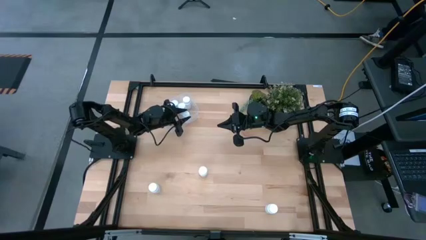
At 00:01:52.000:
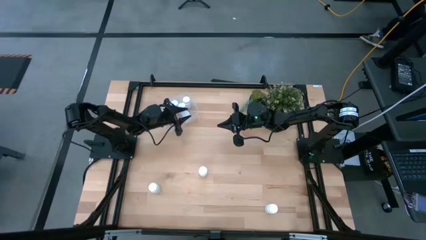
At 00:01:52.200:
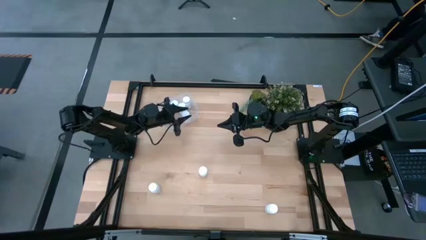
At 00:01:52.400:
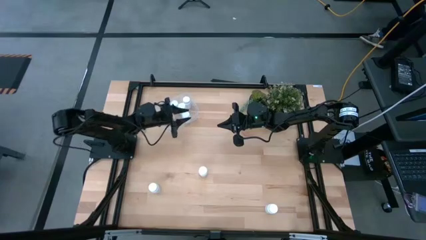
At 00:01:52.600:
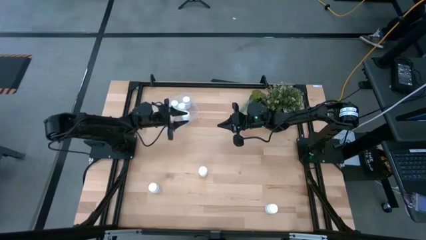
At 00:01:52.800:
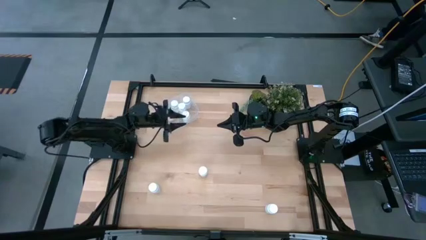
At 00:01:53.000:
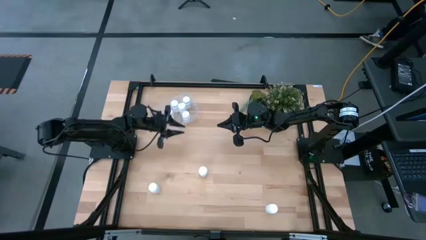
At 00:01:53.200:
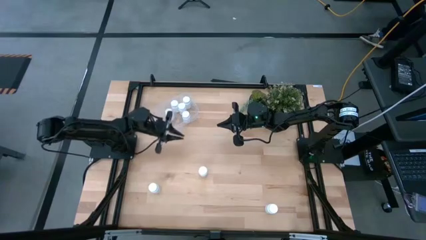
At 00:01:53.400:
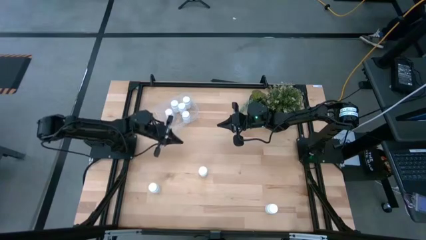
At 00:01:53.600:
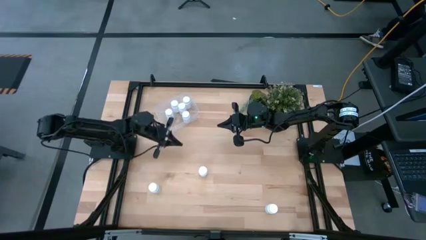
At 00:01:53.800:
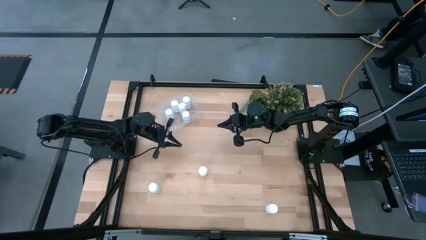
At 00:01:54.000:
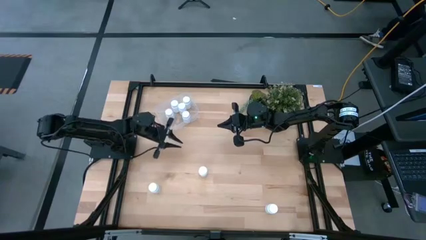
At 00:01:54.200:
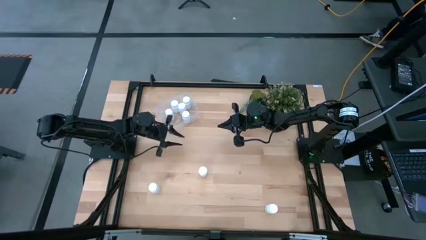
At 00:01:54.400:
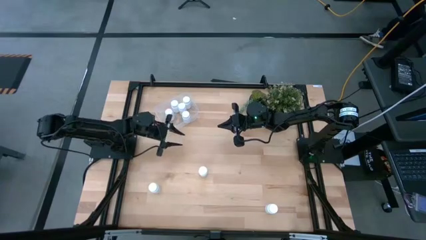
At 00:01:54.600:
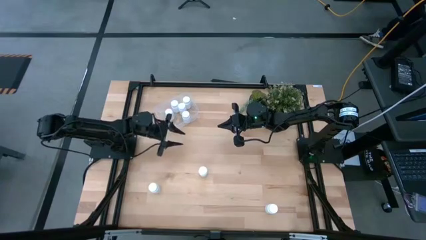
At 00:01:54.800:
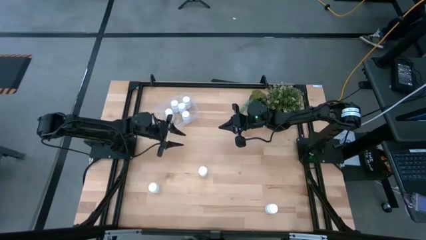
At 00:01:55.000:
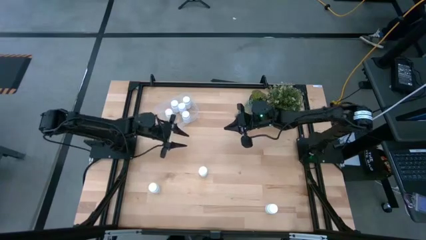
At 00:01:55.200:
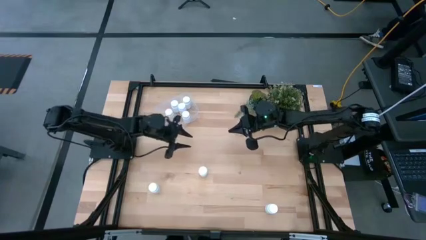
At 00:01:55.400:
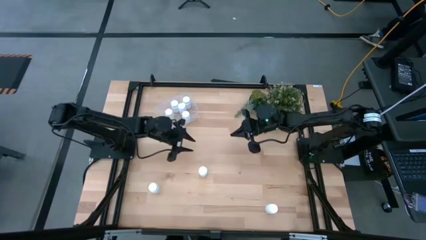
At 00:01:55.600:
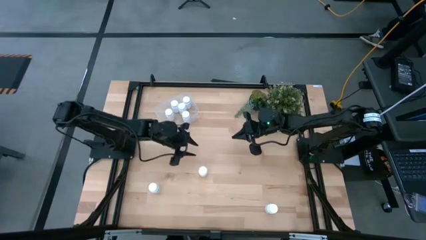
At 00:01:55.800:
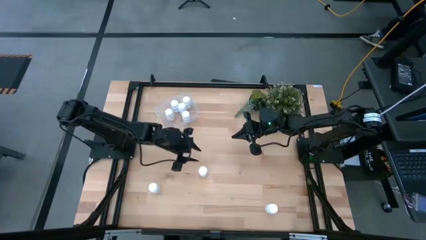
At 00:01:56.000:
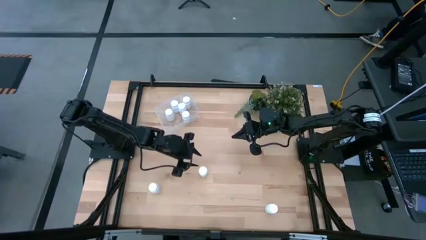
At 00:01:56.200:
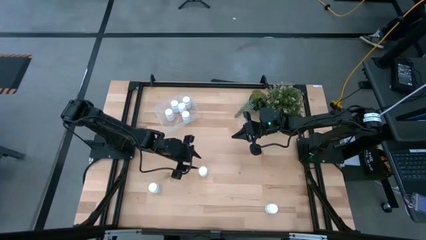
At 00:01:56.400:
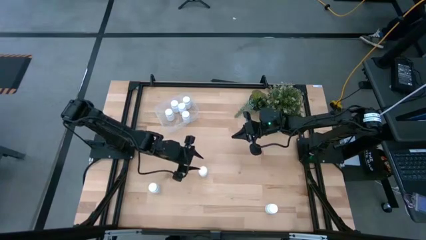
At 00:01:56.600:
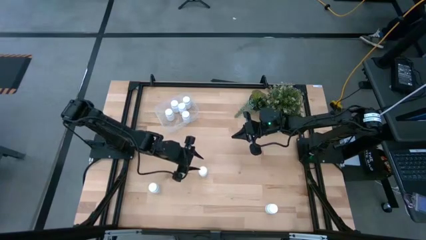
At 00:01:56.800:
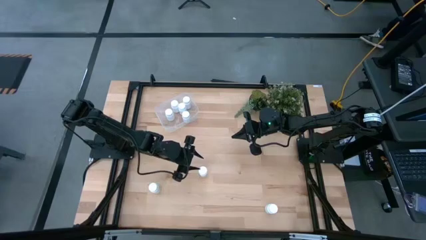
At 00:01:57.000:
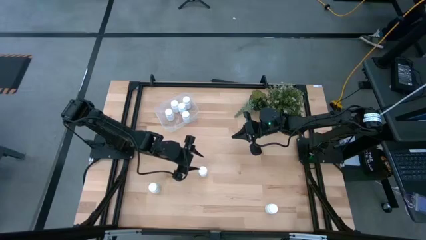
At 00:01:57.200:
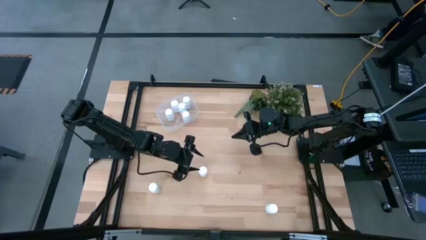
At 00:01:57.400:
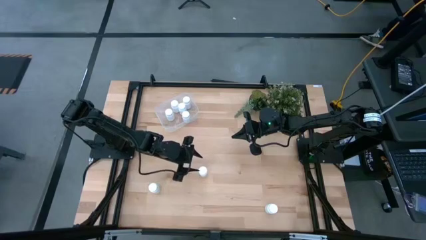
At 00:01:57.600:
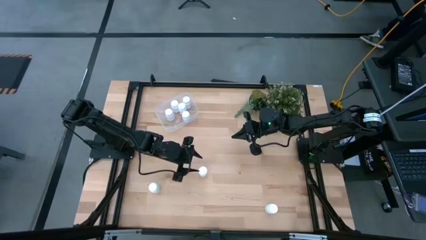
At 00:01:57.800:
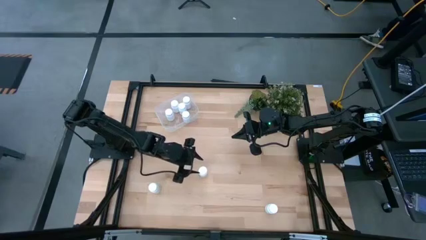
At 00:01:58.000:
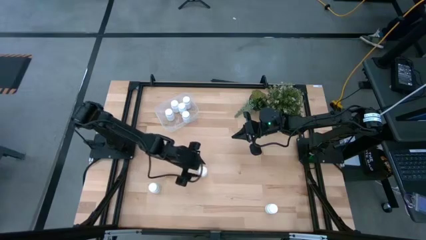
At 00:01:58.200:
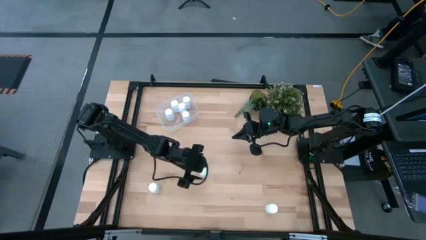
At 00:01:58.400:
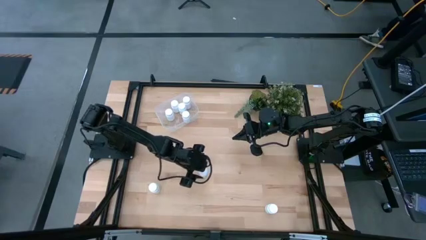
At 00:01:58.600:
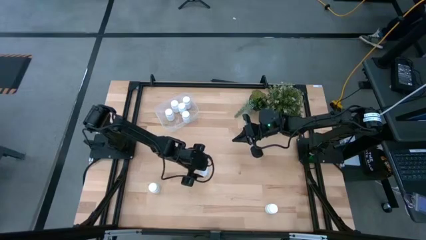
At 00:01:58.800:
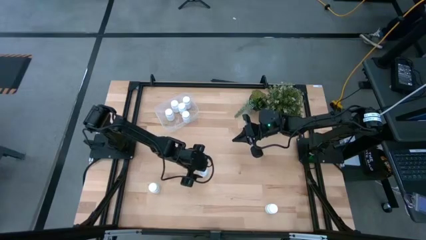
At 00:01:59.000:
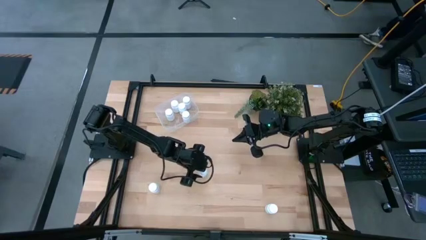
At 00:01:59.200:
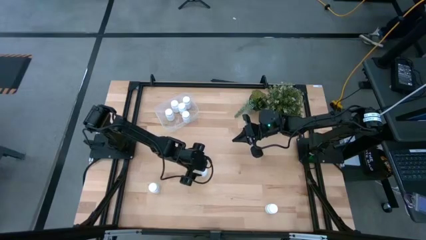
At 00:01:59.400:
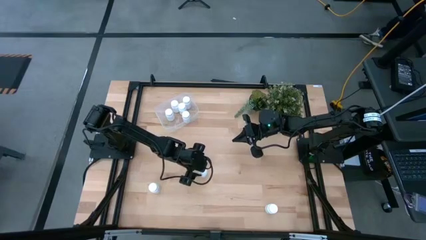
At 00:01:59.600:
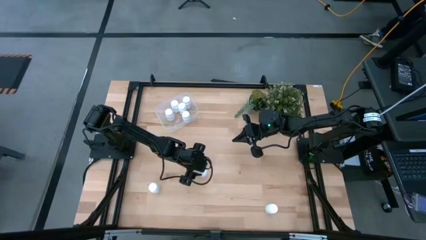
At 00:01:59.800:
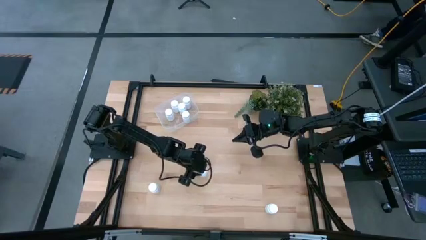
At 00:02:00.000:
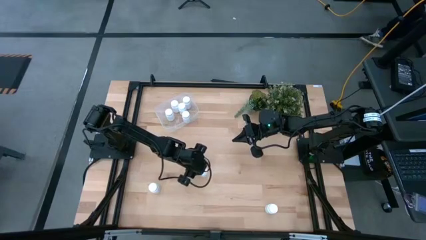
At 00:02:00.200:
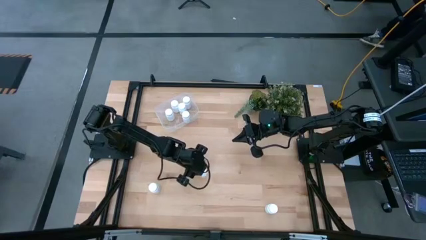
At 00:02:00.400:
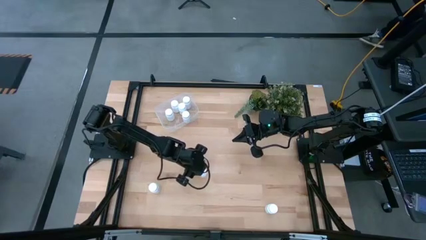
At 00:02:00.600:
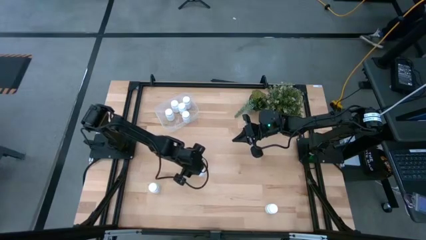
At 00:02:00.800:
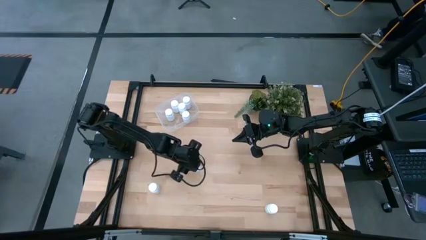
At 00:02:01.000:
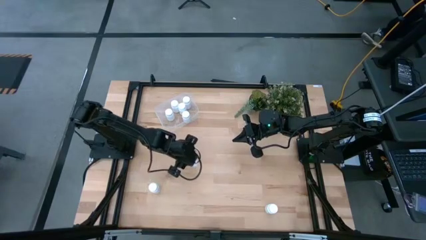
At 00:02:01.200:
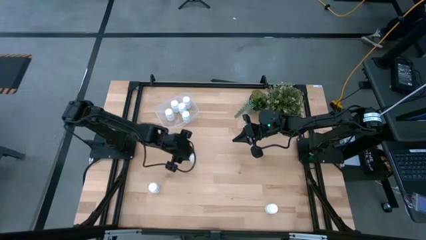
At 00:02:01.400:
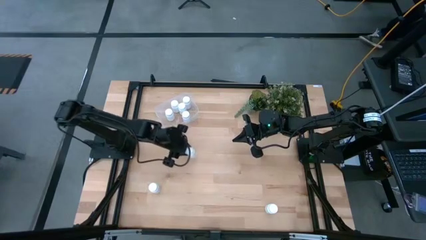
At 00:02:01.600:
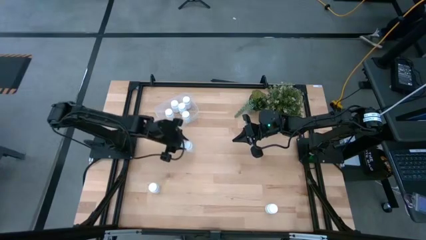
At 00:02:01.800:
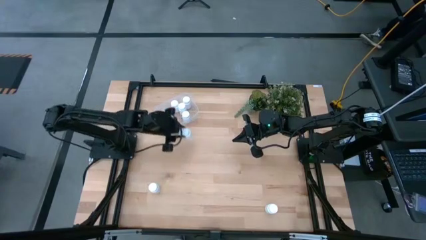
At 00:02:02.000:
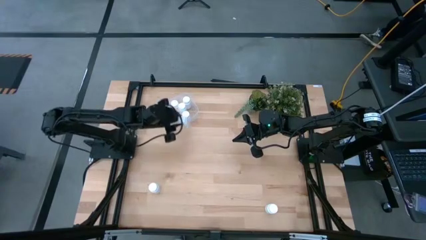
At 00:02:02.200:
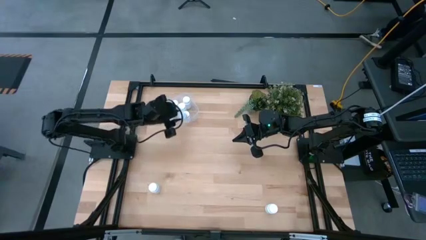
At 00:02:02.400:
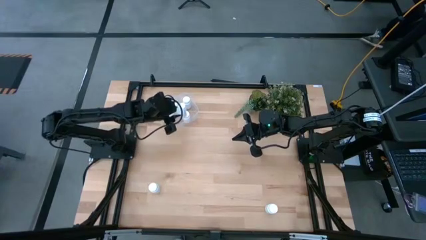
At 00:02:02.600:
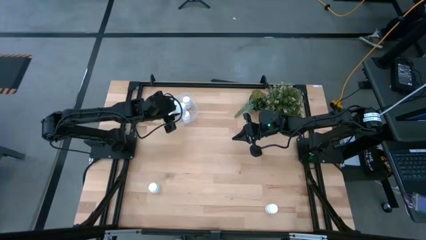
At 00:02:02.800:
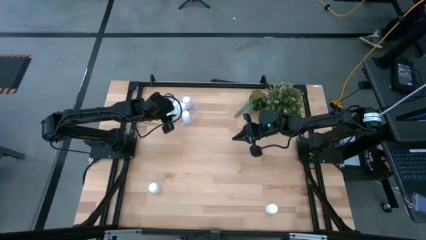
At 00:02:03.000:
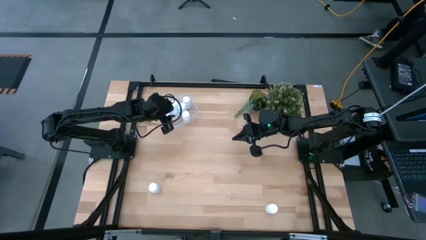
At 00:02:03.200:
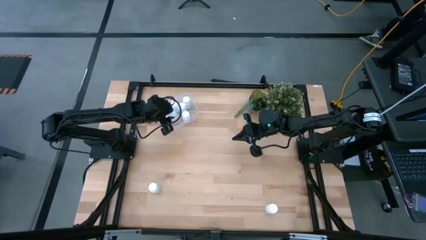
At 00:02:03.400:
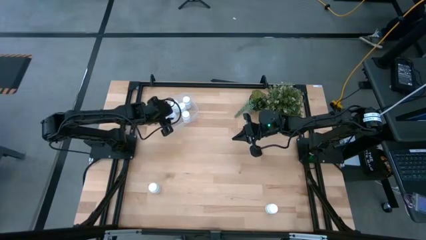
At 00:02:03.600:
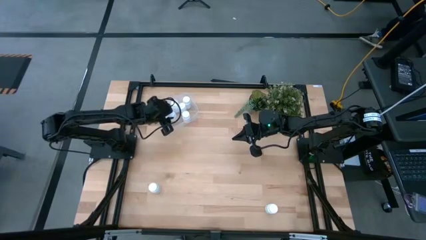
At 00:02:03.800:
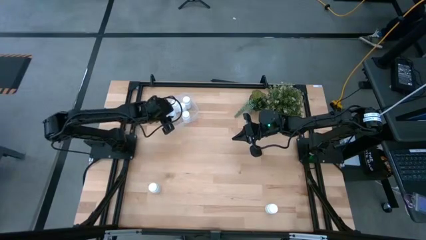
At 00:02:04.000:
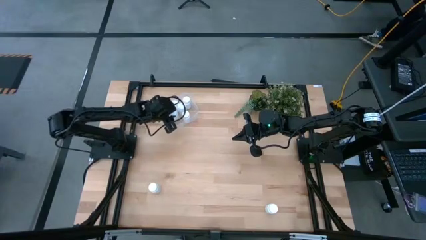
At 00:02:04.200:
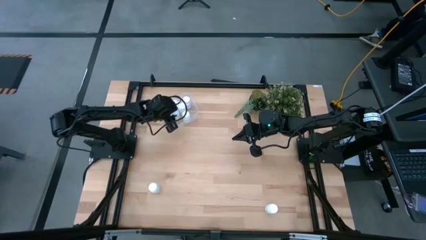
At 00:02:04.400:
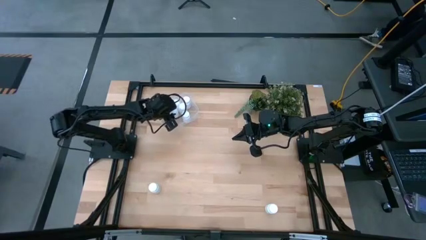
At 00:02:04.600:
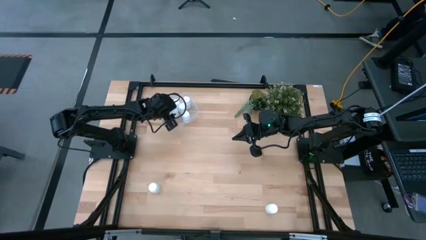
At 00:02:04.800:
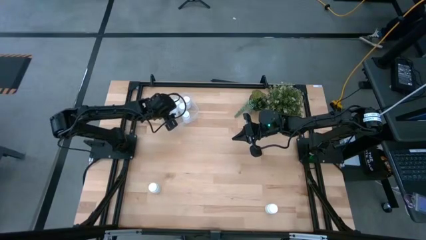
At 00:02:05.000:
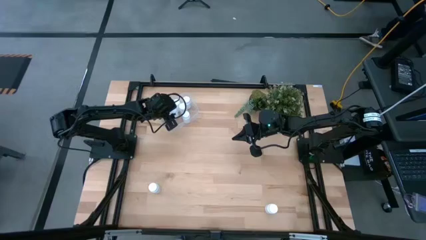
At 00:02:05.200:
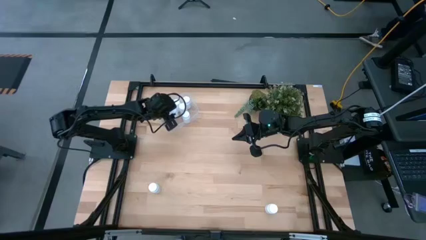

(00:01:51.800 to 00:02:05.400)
Task: Pick and place pill bottles into a basket
Put the white medicine bottle into the transparent bin
